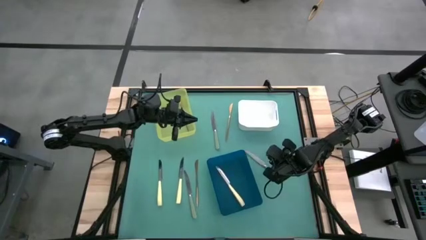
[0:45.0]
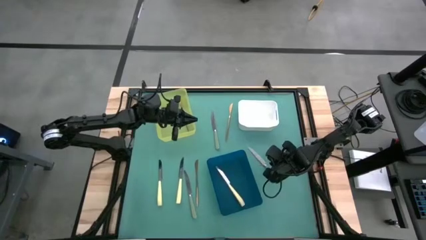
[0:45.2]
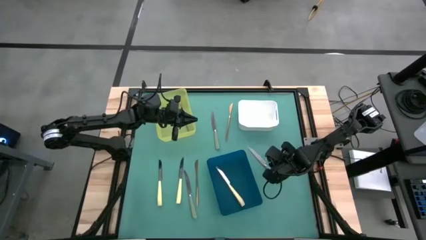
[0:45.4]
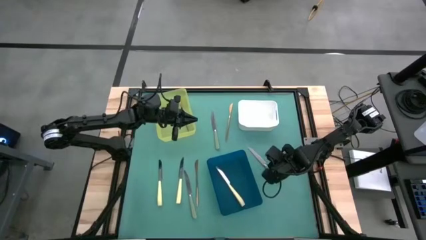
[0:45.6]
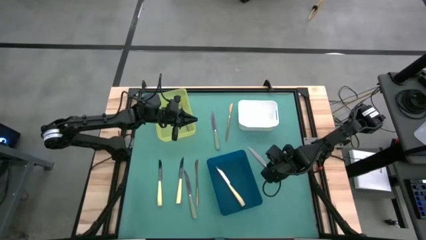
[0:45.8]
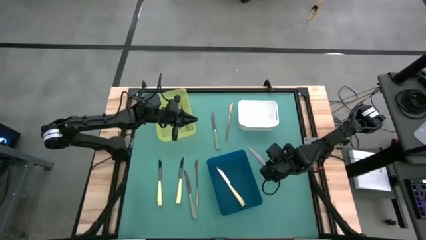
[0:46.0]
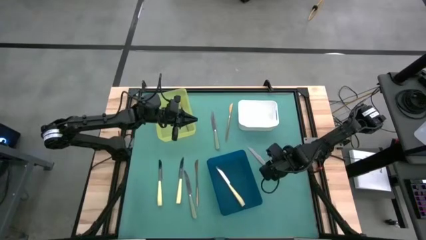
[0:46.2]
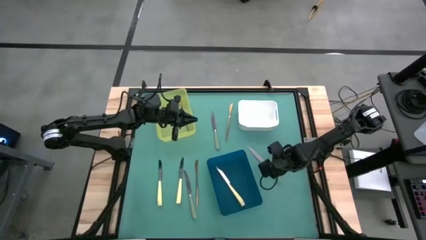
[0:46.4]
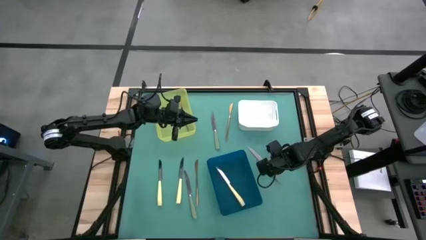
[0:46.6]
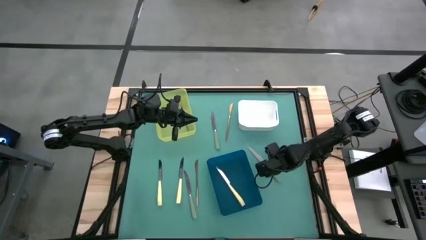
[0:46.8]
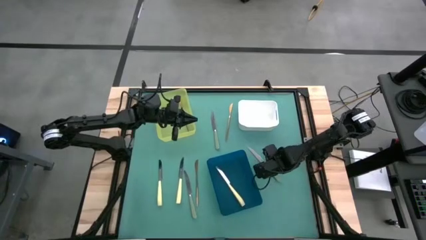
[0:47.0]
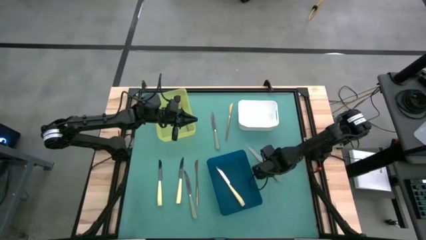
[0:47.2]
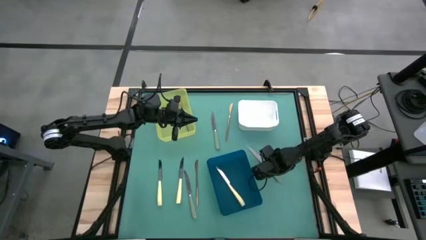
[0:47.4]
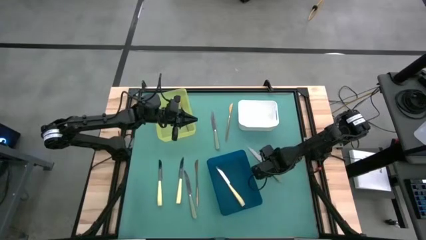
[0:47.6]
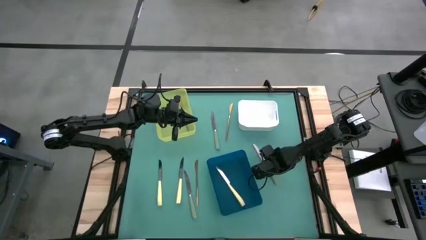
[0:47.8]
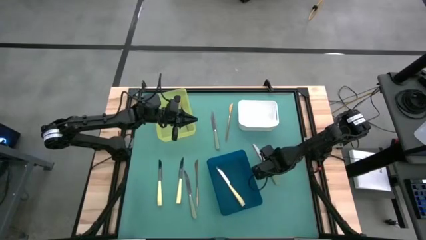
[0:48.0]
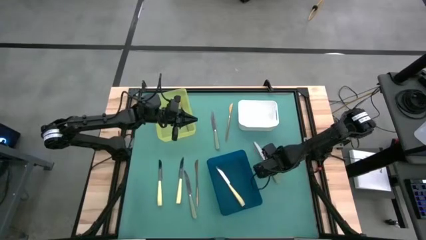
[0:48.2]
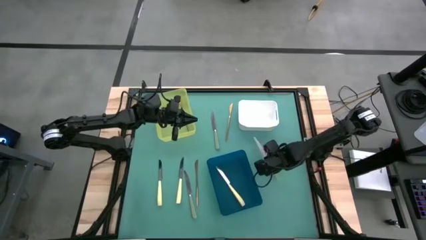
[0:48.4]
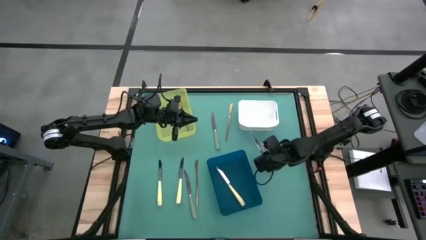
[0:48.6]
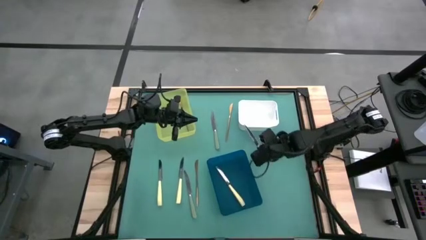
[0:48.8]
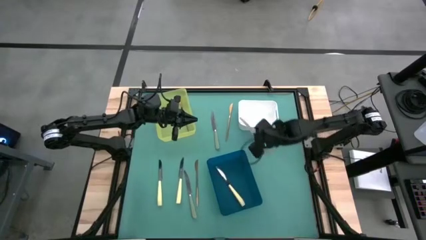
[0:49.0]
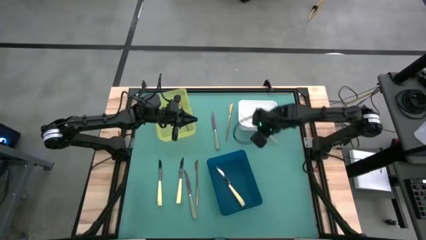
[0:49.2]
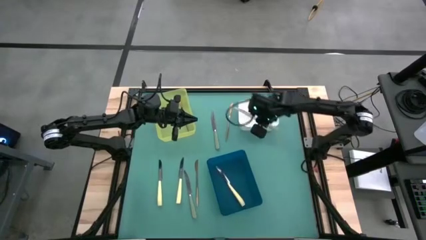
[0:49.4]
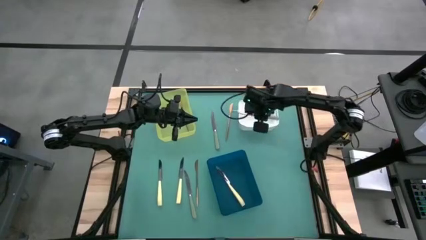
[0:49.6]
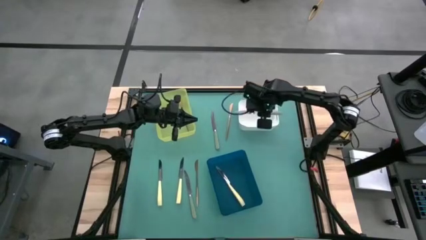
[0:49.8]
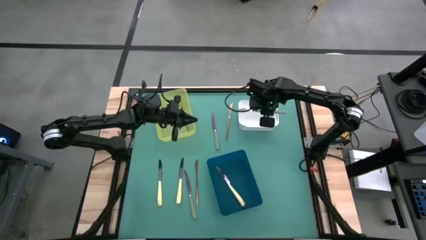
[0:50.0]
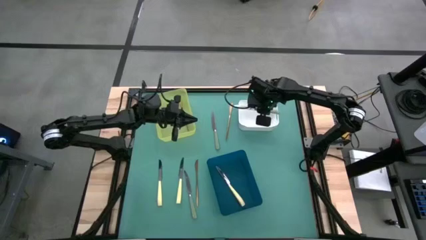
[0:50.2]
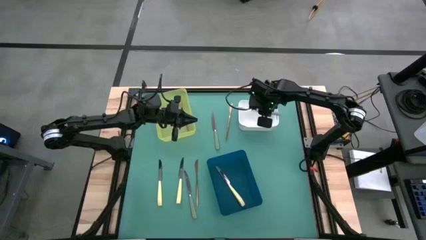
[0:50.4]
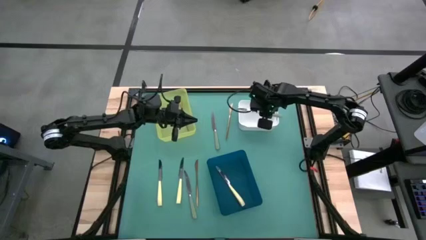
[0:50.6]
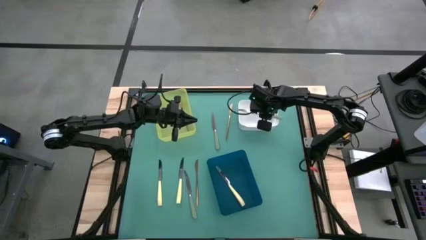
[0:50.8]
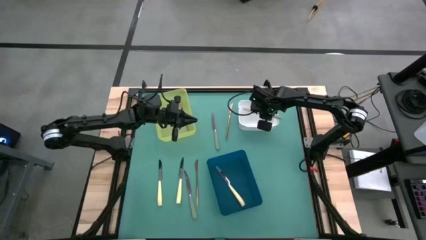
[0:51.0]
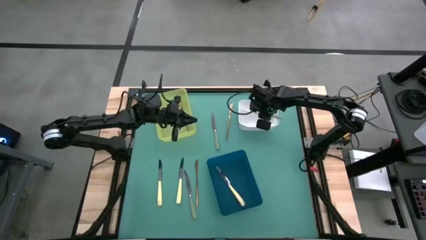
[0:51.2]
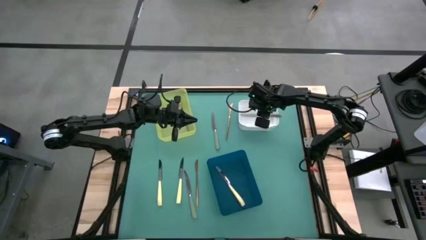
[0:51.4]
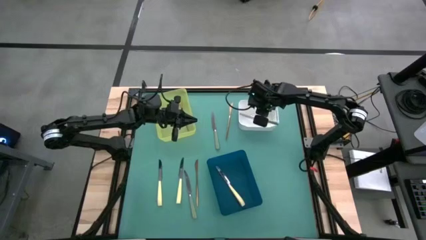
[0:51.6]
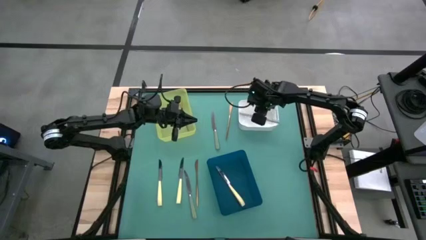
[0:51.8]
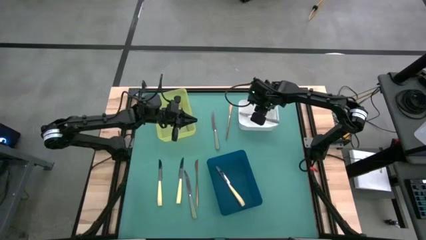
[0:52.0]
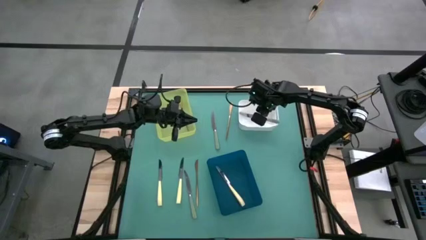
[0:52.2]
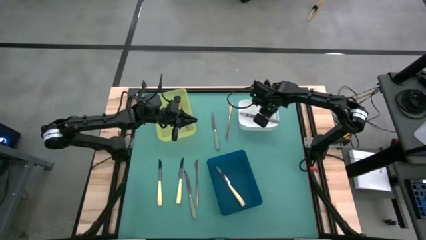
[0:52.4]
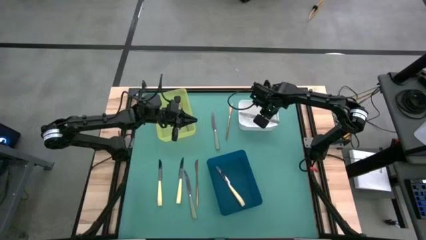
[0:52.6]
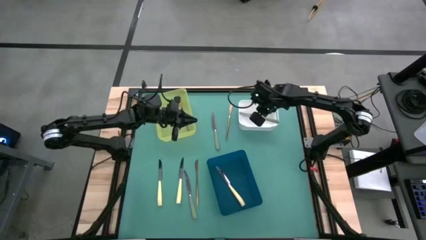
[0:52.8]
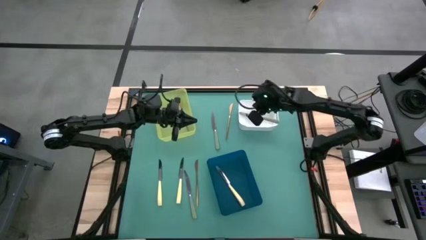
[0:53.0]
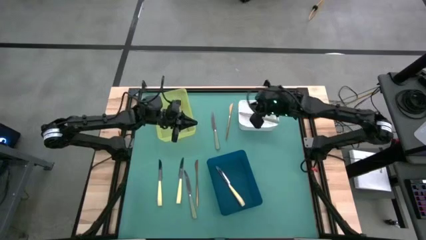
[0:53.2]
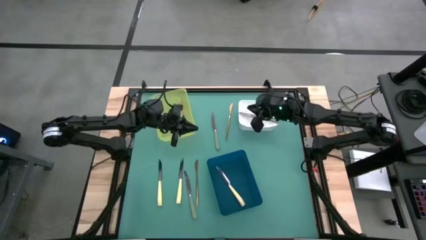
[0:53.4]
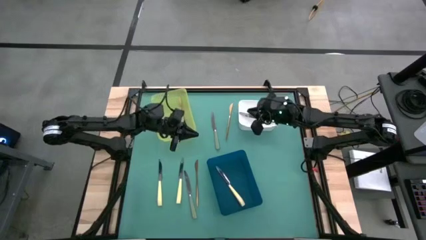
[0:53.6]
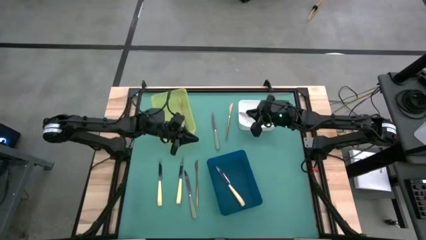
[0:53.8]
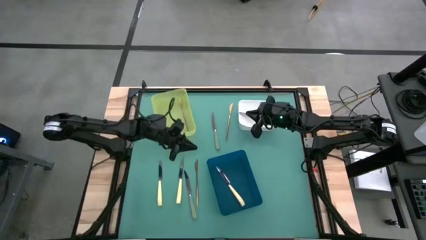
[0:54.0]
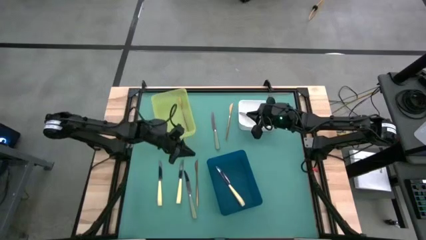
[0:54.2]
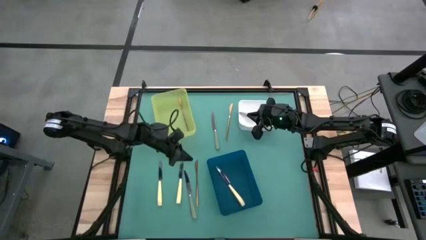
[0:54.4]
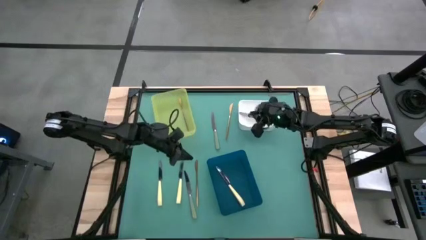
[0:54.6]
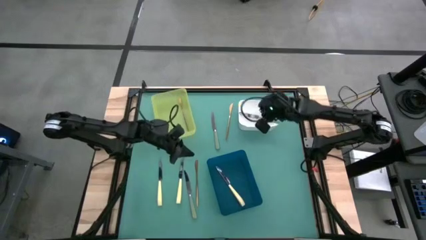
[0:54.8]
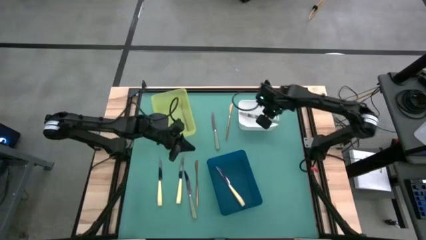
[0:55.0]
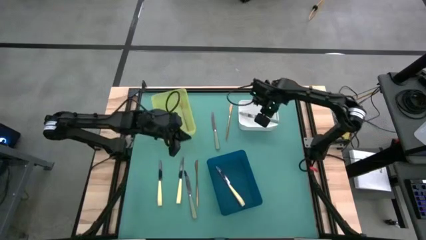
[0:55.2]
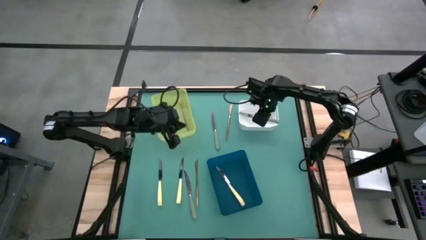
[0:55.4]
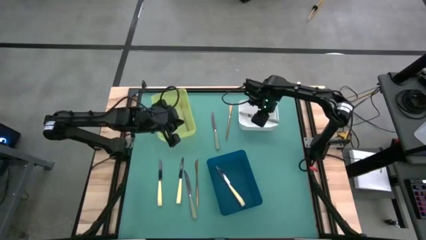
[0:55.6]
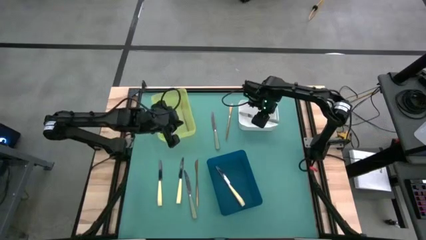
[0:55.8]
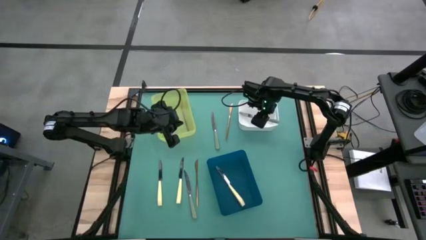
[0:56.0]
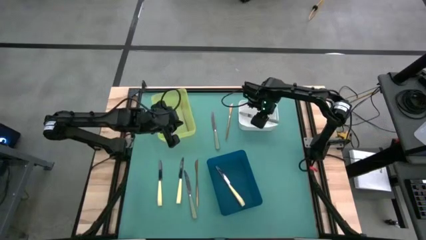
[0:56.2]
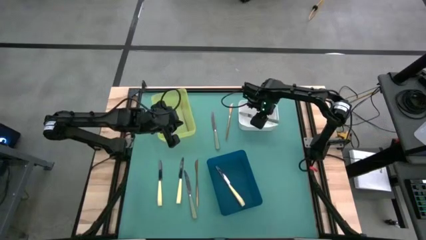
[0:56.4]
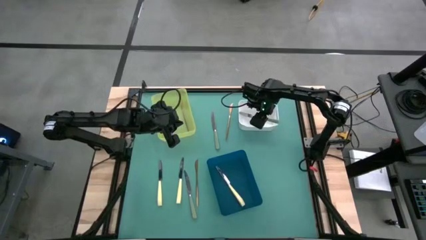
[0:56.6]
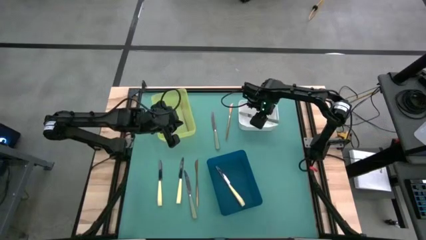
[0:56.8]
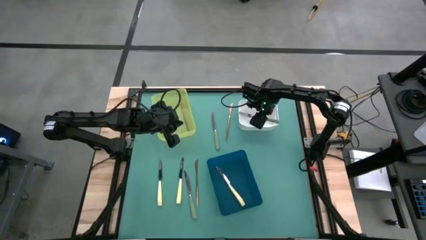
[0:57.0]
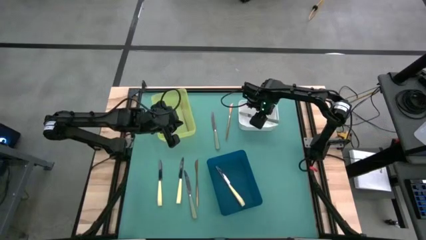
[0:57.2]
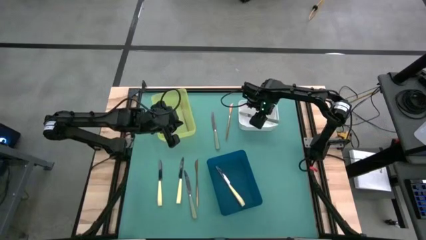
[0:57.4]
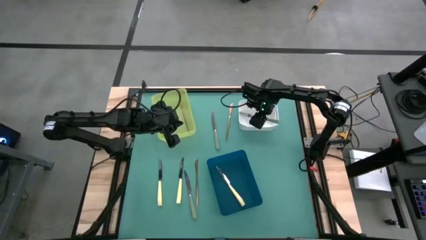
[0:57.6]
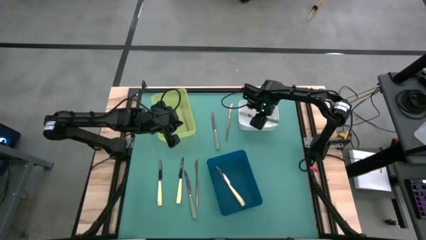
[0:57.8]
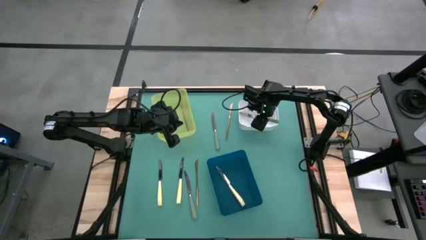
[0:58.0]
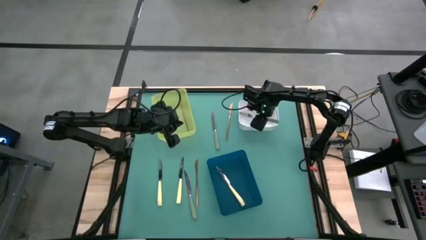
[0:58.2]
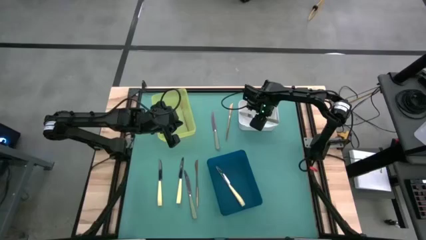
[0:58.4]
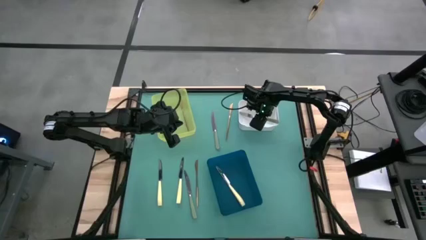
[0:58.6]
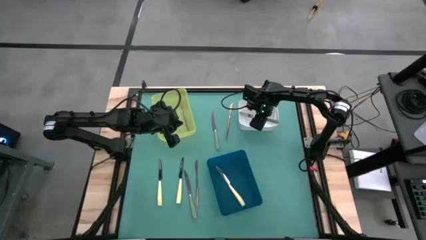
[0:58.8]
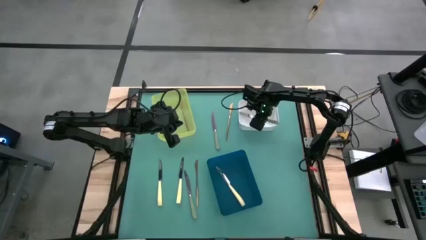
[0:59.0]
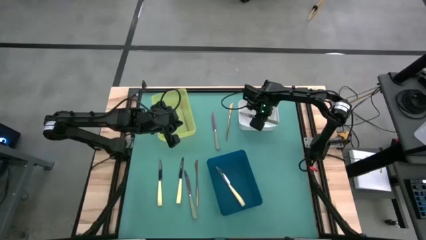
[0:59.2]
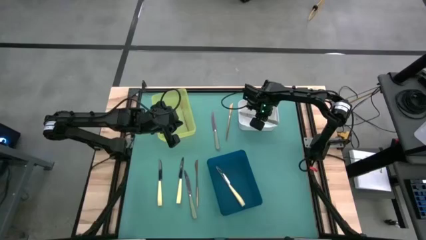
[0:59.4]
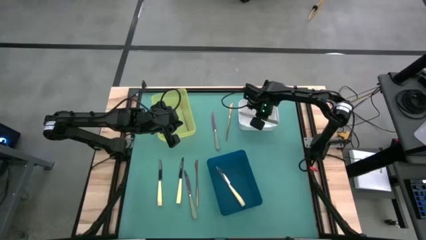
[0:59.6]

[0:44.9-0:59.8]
Task: Sort silverware by color (type)
Put the bottom right green knife into the white bin
